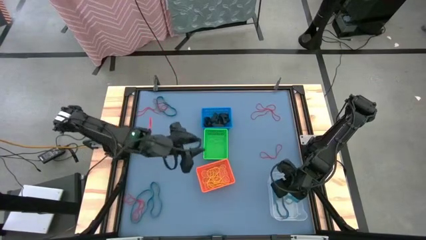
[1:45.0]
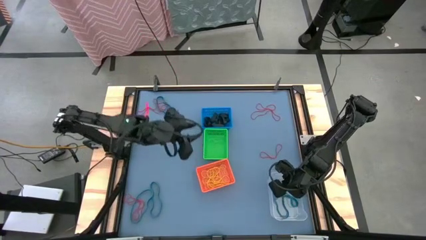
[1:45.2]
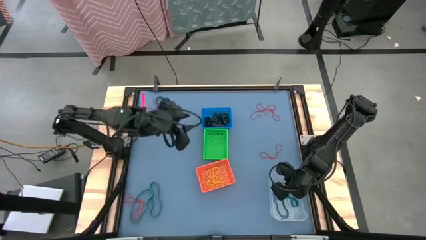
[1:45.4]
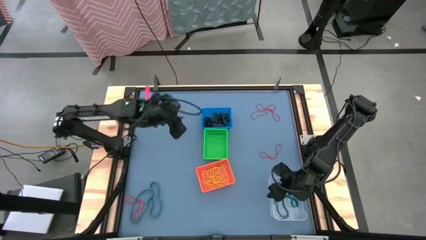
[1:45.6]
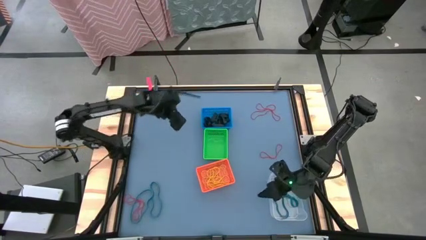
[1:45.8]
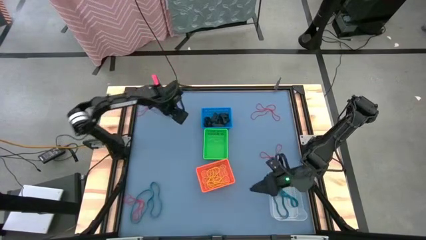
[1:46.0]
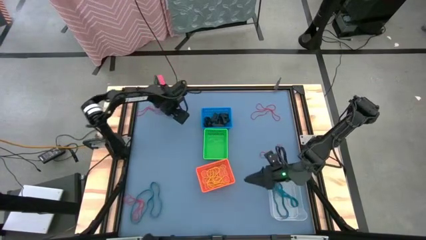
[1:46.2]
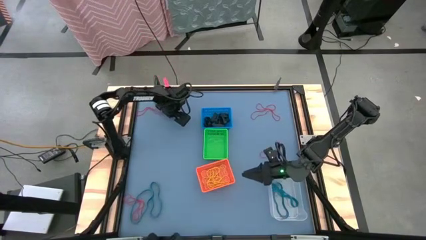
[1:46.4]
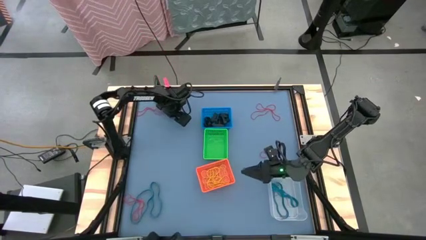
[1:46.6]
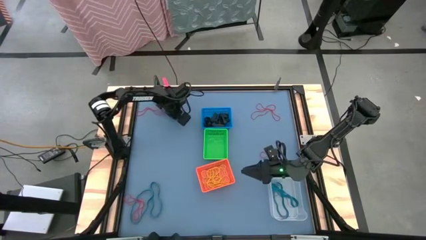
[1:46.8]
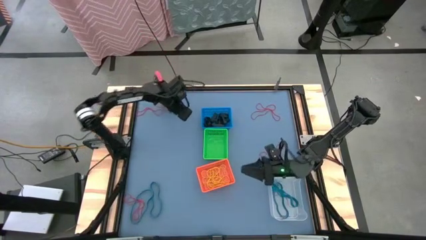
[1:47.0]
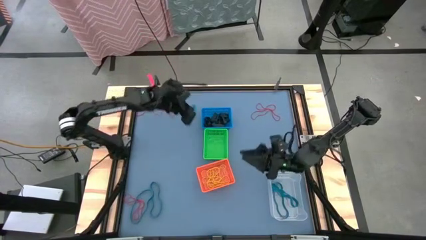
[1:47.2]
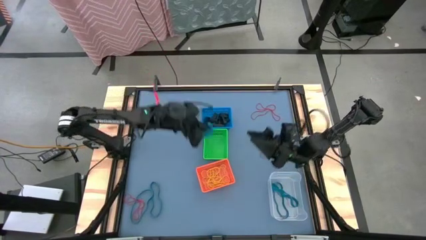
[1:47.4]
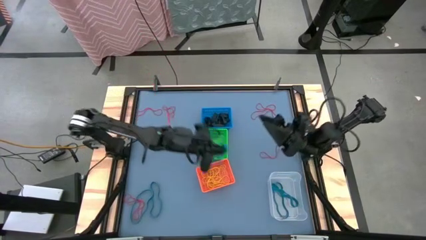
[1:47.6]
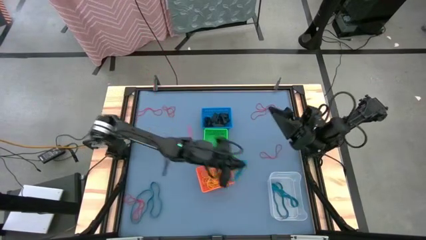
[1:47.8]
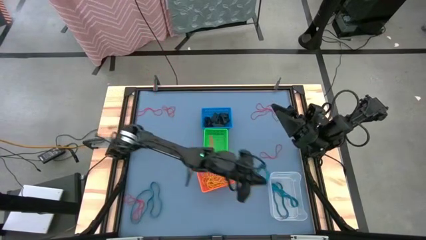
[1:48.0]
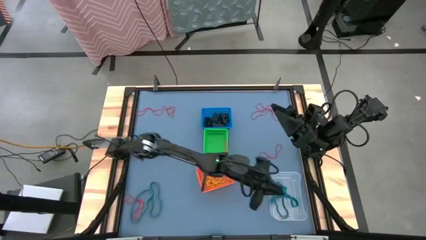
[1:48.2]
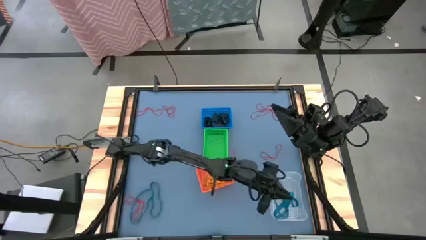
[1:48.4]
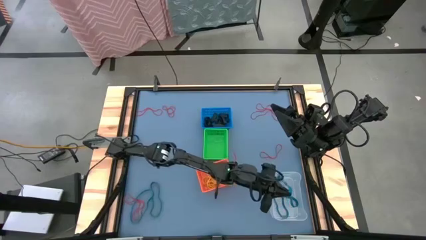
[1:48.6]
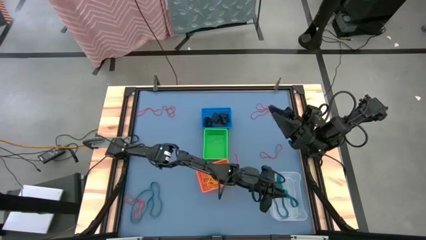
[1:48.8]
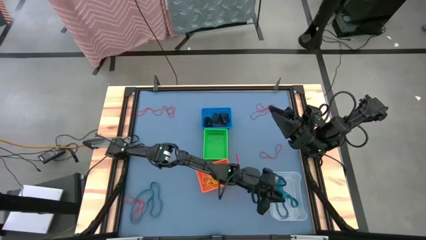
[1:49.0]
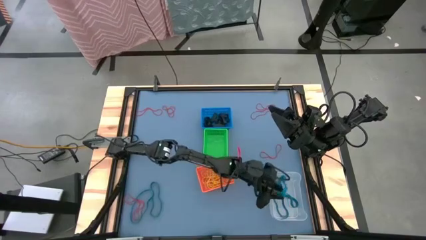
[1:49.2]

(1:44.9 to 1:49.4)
Task: Sort rubber bands into baskets
Put the blue rubber band into the transparent bin

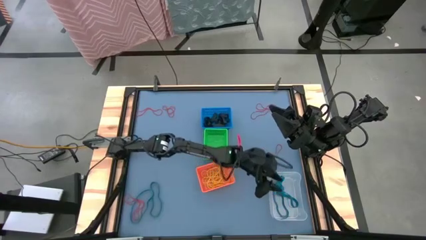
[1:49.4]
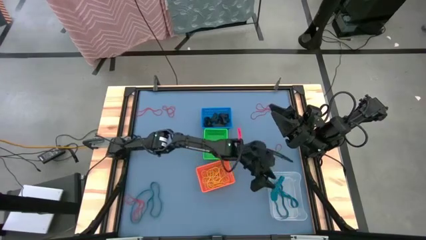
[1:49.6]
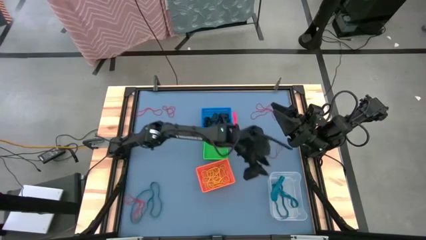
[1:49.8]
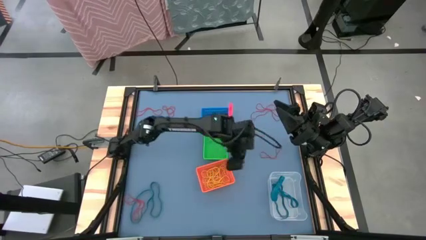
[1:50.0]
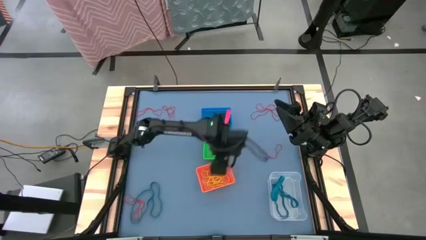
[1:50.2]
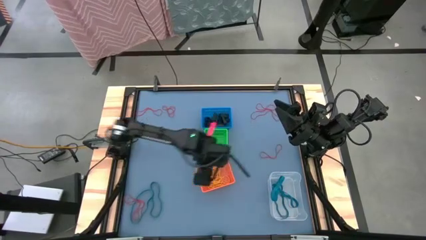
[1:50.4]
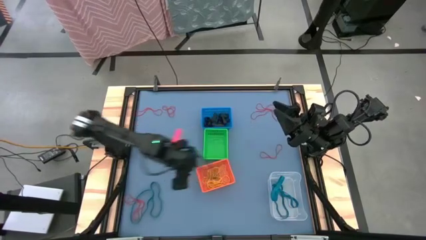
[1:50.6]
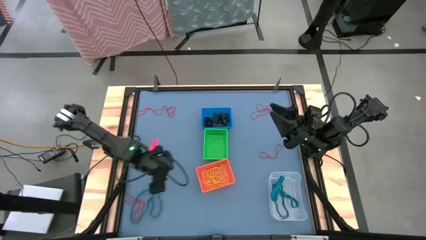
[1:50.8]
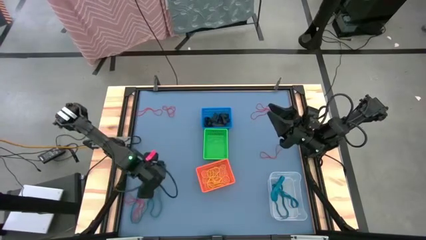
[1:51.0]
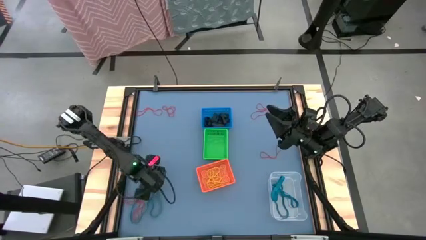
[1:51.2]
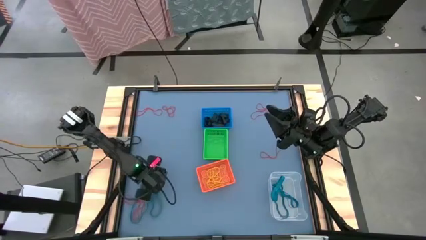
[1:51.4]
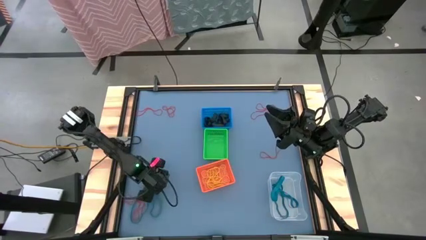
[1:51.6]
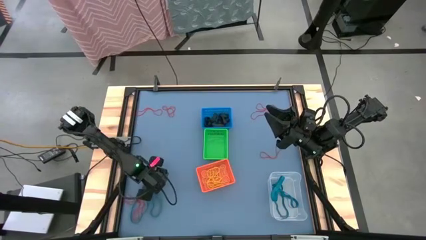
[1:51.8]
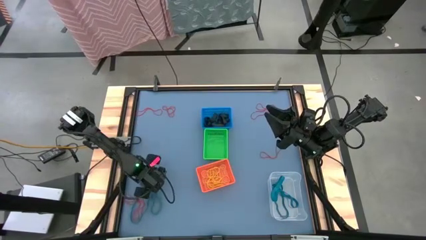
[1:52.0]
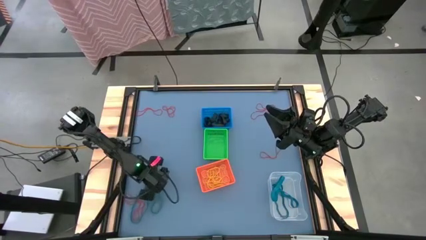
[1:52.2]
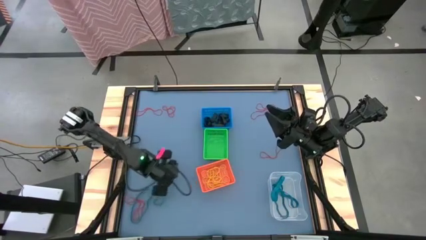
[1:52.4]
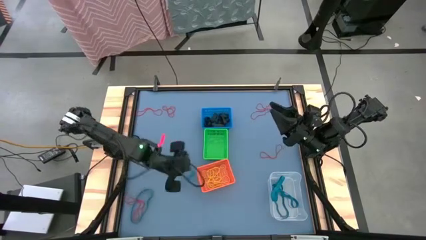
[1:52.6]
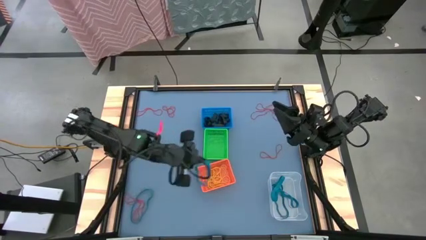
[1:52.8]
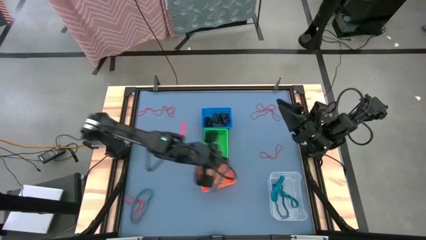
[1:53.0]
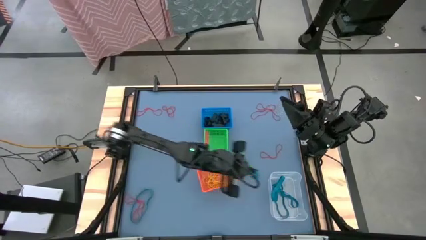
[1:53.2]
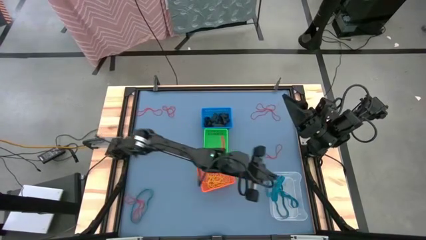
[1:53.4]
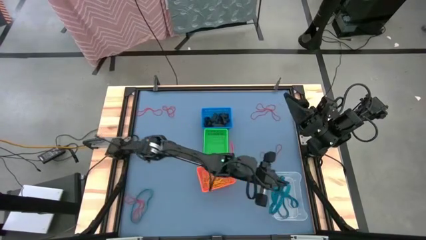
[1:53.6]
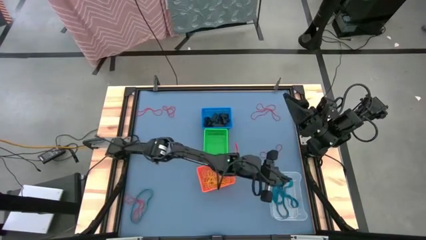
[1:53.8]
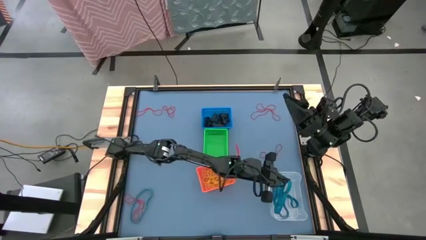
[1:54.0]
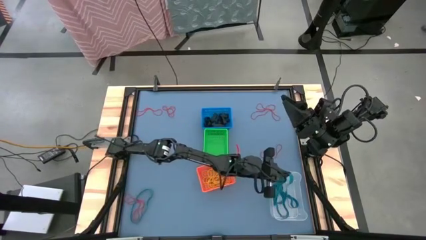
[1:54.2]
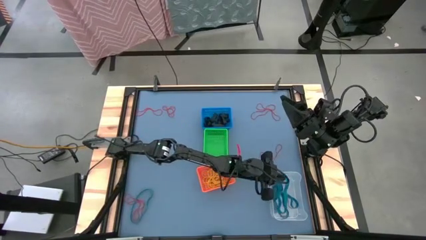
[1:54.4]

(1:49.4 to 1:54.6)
Put the blue rubber band into the transparent bin

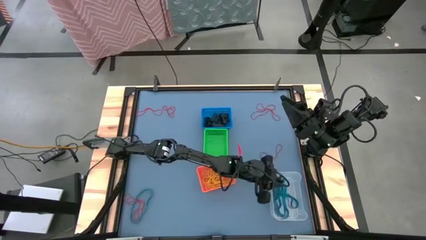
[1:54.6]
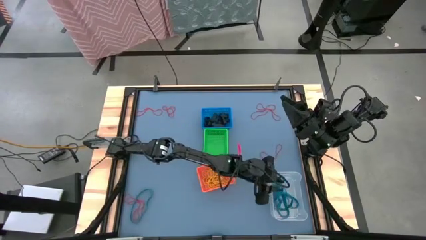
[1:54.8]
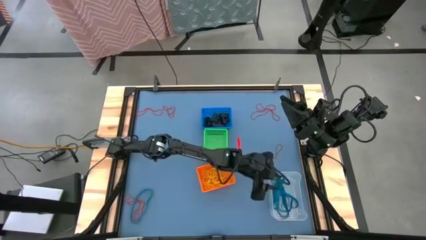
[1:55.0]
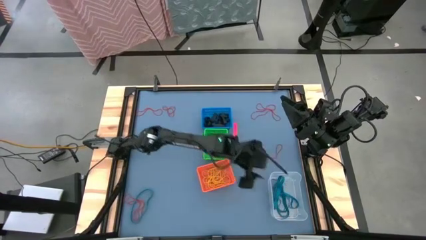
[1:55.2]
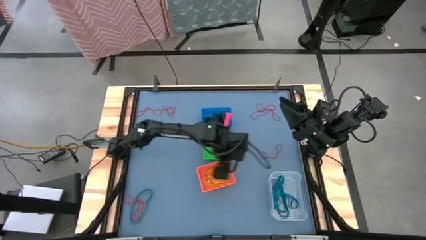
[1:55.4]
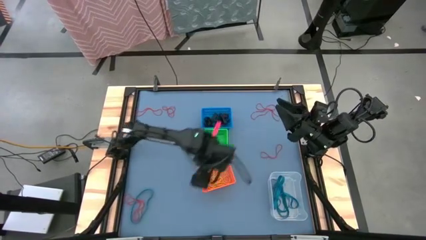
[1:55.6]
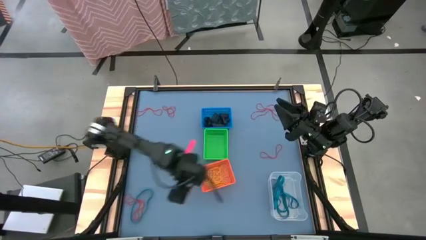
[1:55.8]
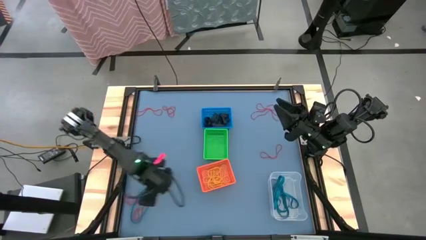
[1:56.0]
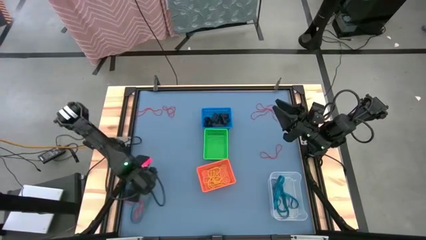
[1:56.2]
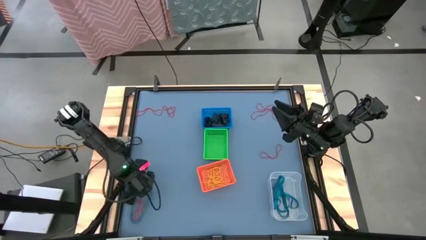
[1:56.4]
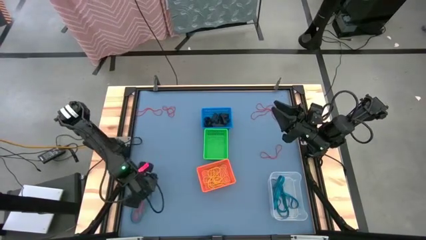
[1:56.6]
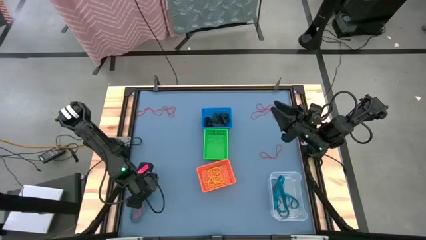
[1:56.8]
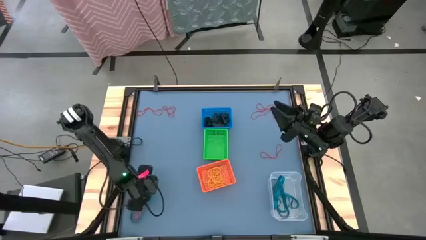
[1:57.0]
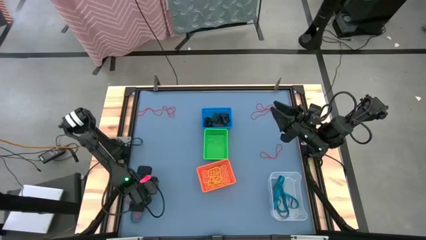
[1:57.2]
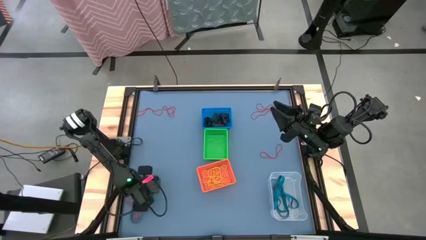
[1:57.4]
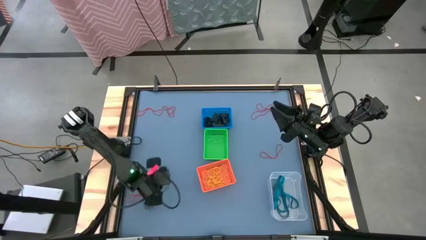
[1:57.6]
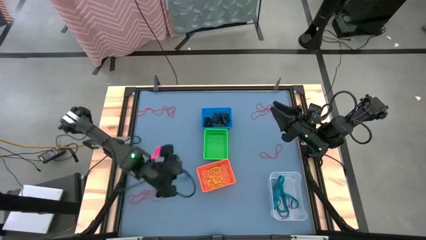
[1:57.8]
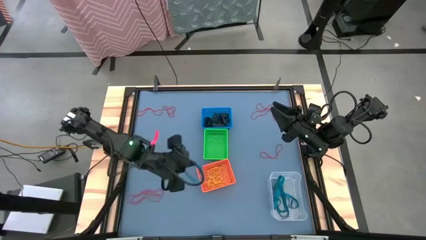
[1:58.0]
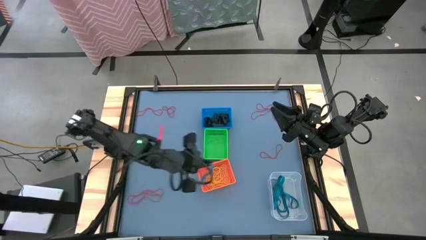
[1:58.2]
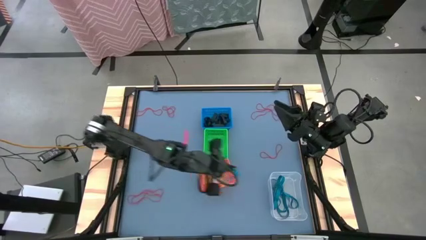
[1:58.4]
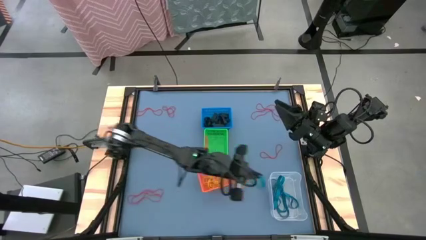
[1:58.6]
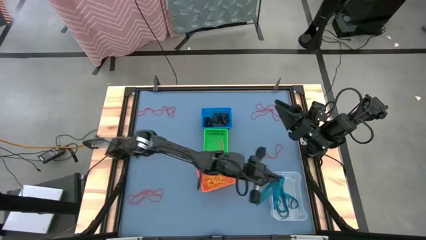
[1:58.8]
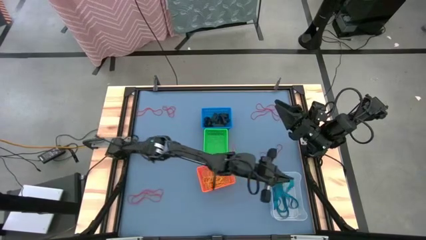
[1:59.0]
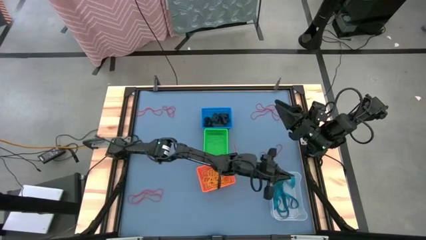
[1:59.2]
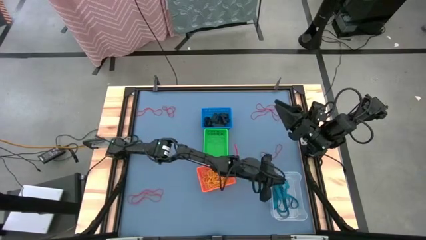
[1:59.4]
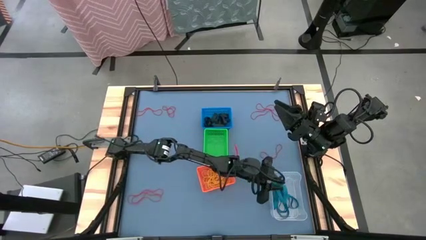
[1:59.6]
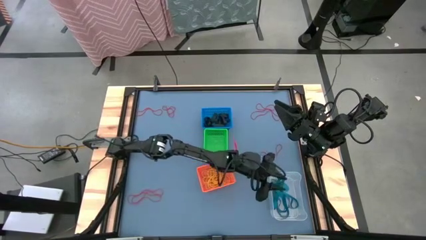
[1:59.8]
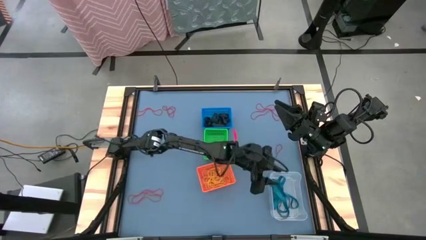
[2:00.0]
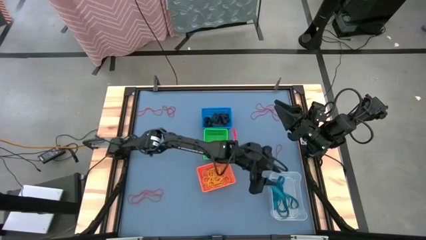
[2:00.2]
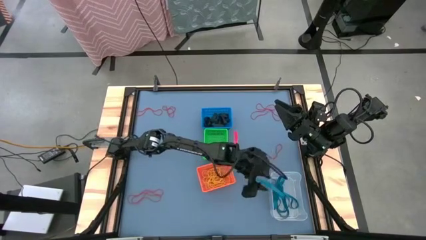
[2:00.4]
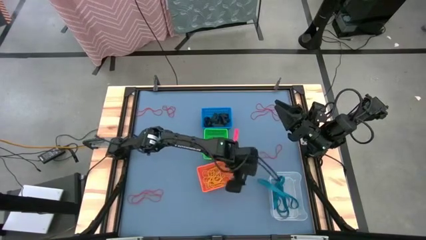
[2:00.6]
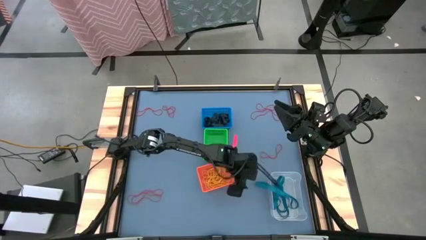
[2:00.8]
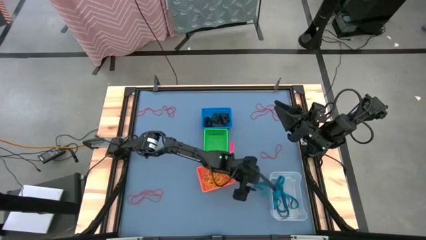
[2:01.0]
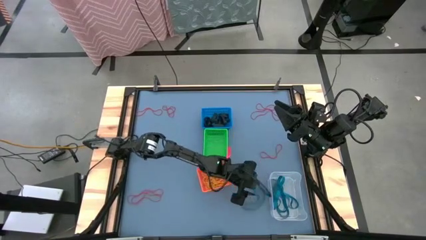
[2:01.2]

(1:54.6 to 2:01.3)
Put the blue rubber band into the transparent bin

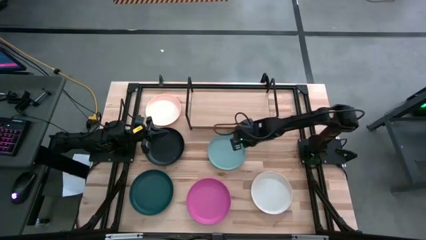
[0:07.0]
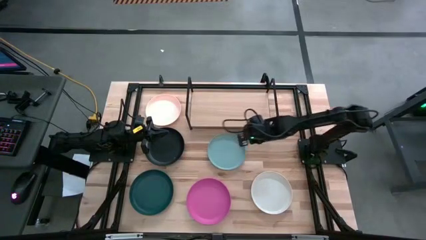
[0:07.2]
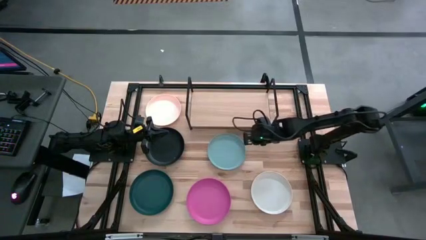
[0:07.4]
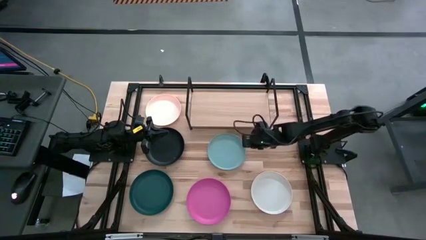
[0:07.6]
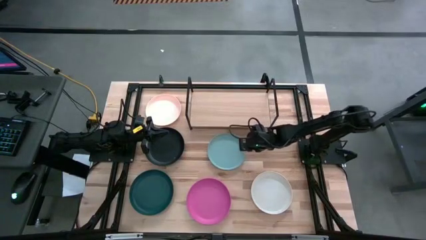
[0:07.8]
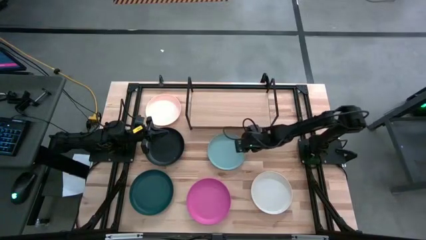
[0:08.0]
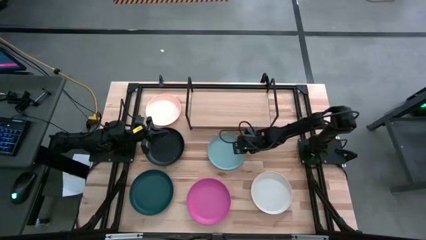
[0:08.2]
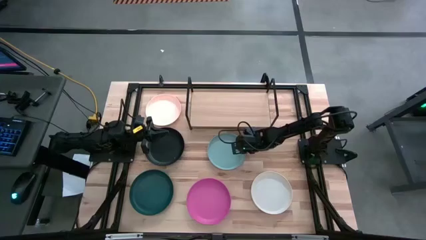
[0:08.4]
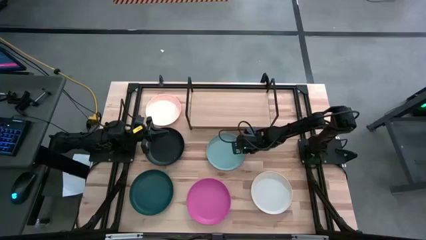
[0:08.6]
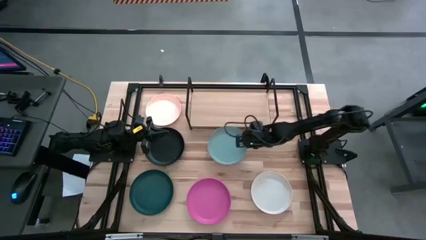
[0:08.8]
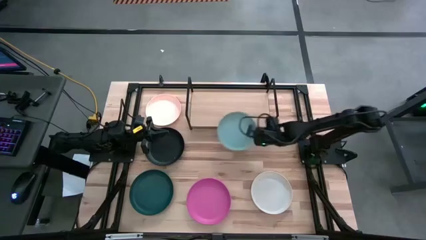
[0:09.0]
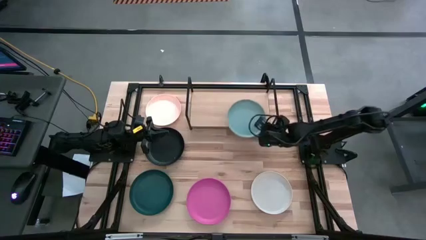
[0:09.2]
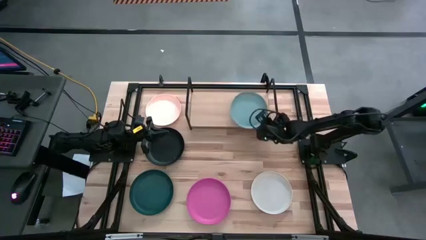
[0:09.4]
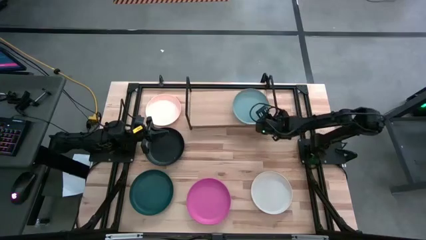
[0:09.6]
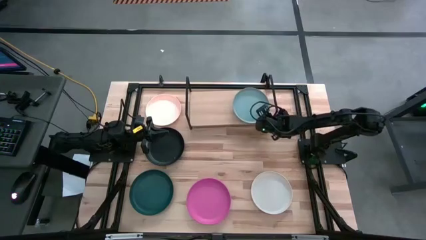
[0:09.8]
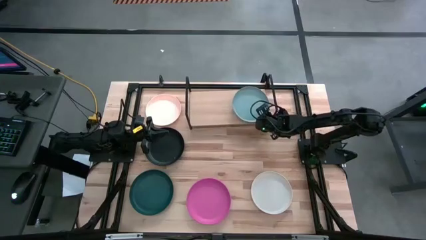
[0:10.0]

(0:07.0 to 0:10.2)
Task: Place and stack plates onto a shelf
Put the light blue plate on the shelf
